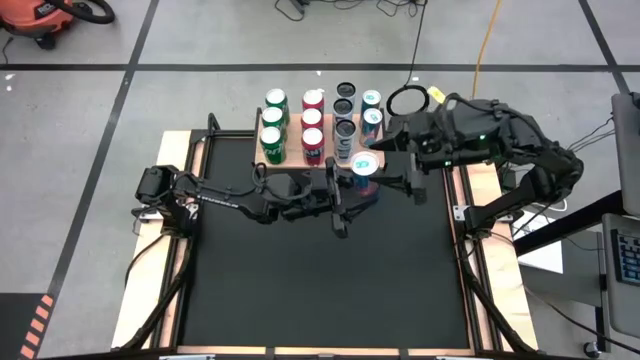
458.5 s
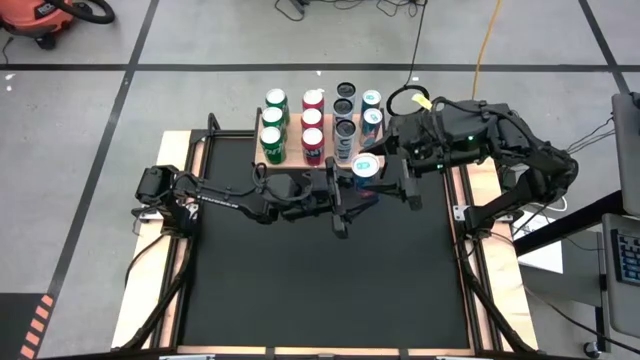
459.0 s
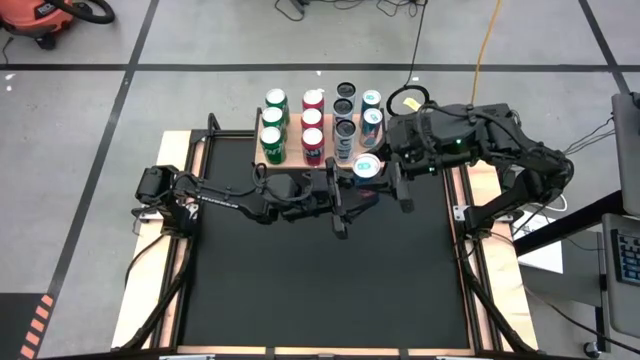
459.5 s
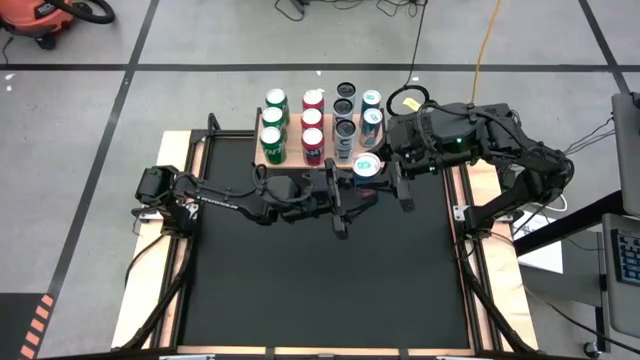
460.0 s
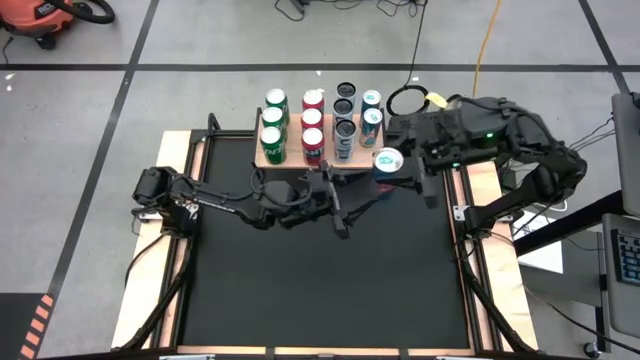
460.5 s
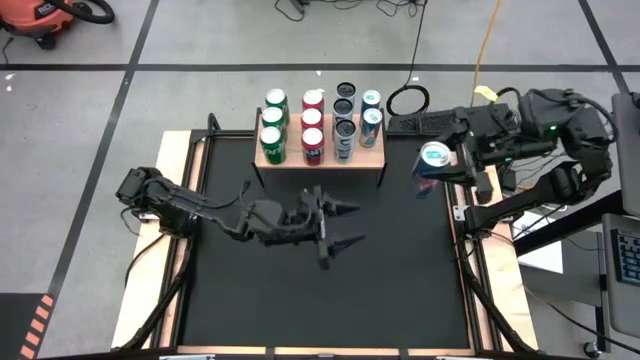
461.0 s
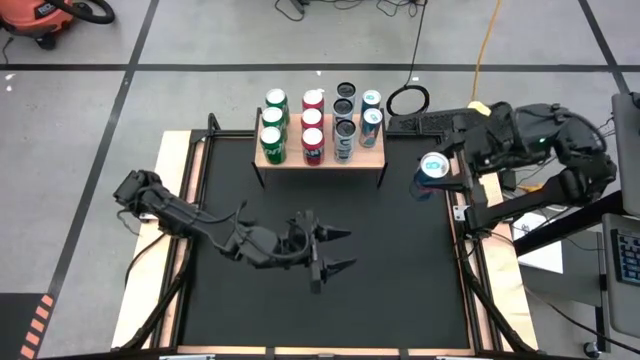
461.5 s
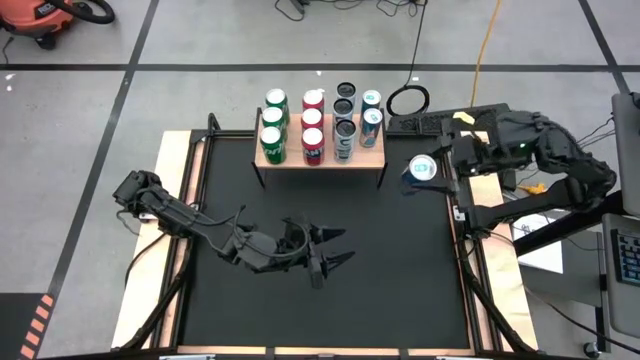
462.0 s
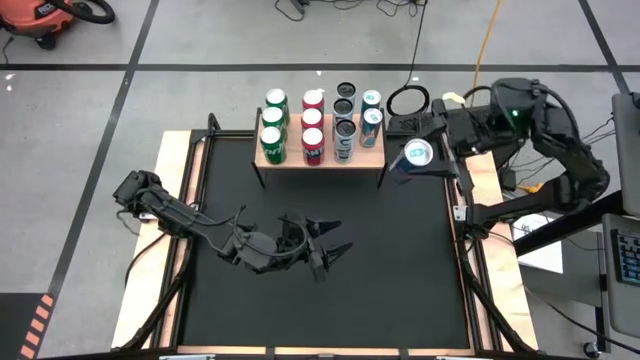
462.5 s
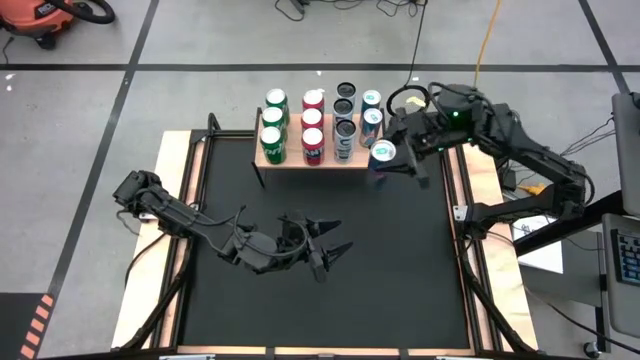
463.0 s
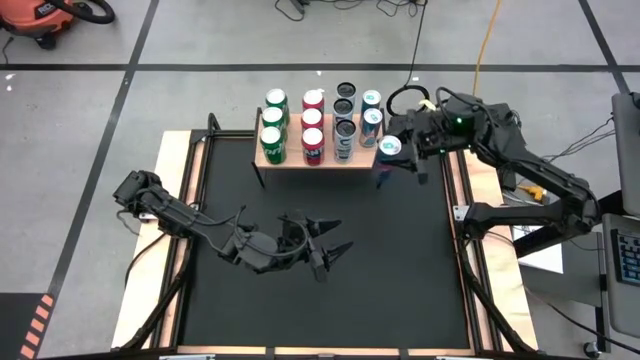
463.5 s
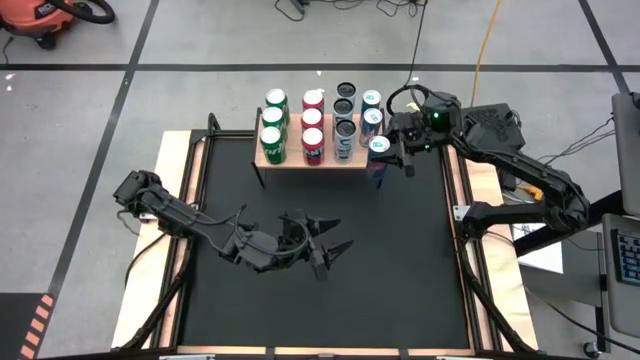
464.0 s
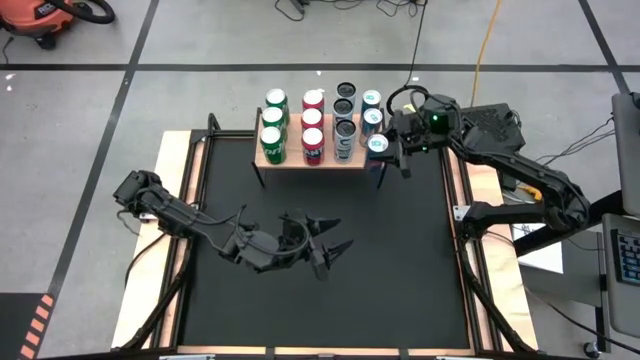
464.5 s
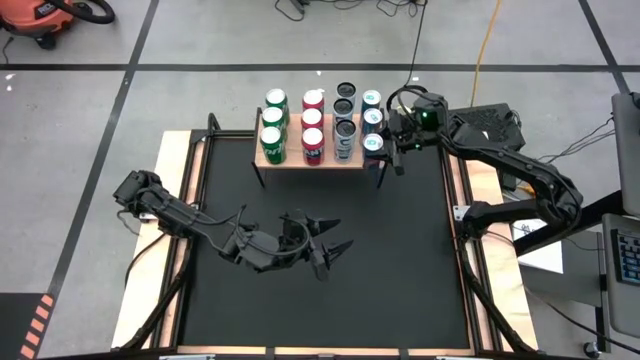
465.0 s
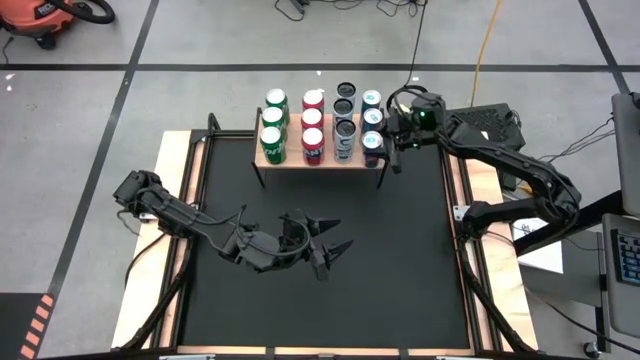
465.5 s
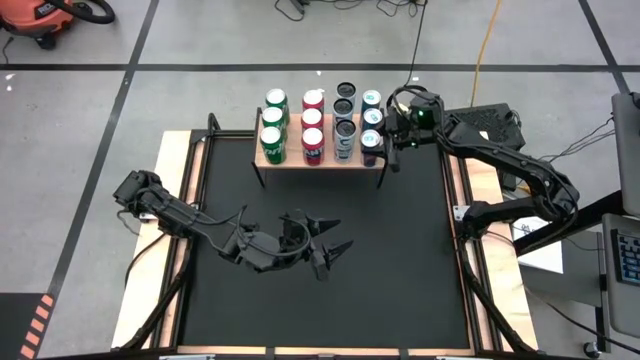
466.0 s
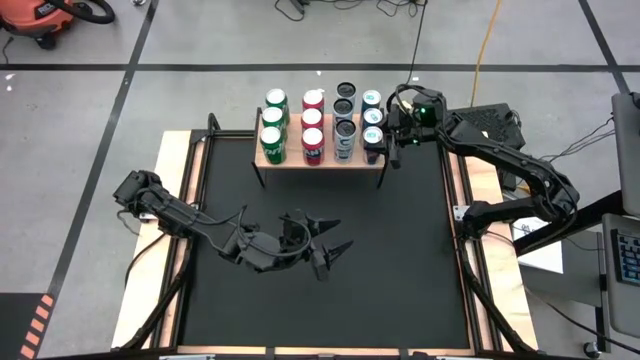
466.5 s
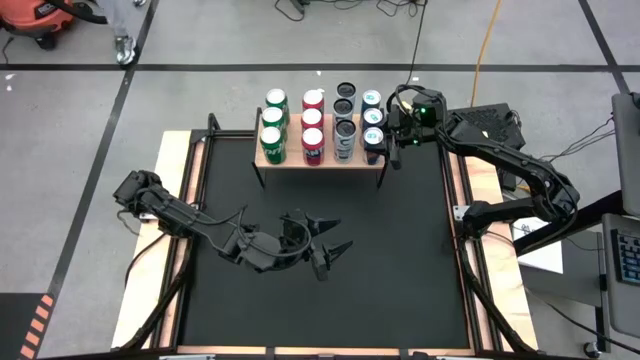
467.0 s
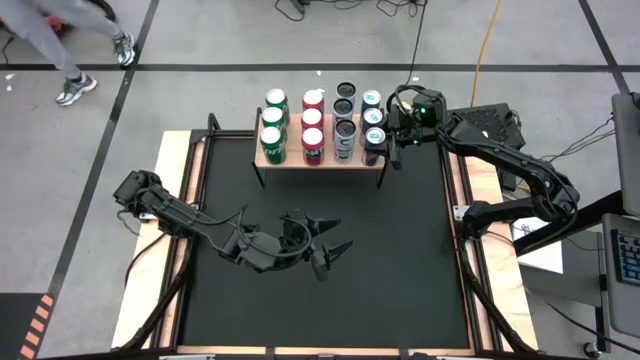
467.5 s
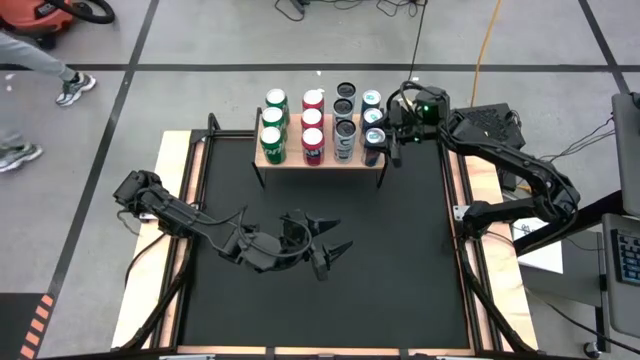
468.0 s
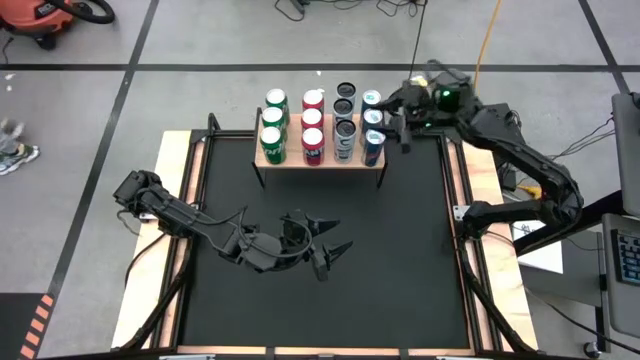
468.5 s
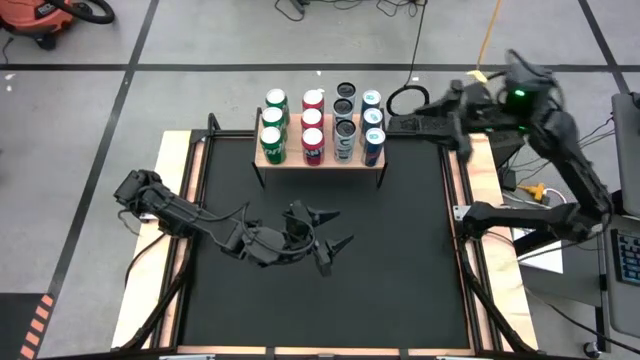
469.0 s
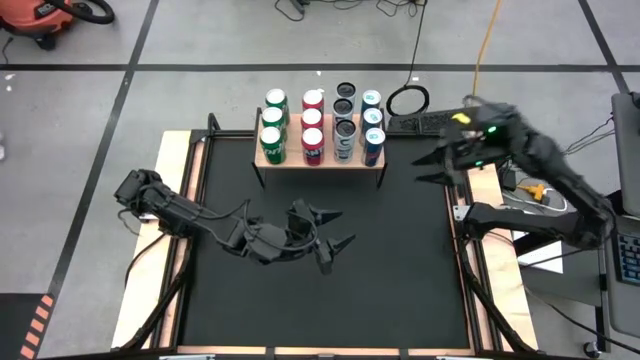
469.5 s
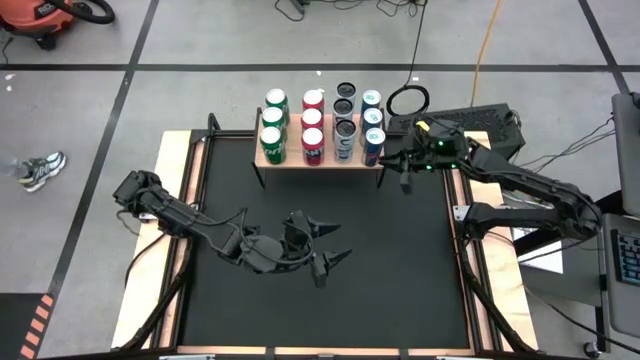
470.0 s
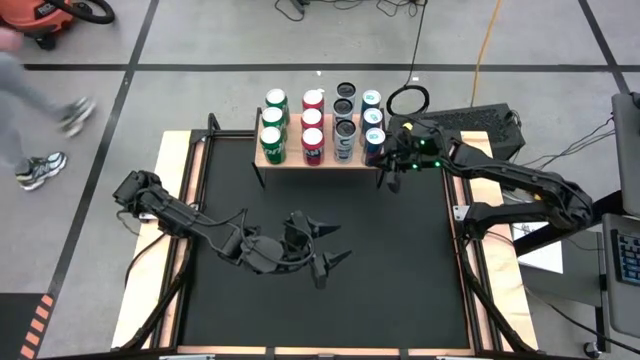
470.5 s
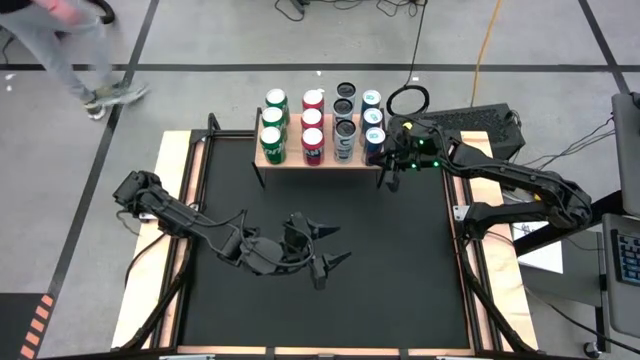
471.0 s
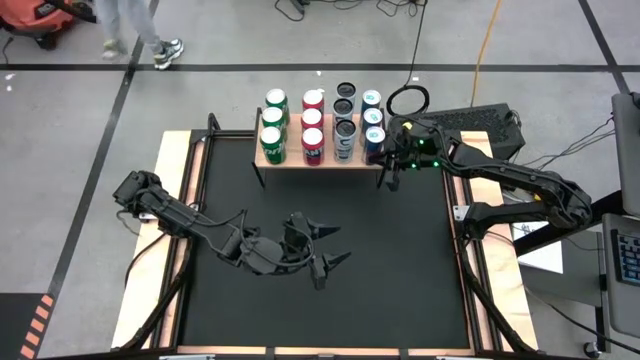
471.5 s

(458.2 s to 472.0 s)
Task: Place canned beverage on shelf
Put the blue soda can on the shelf aligned with the other blue soda can

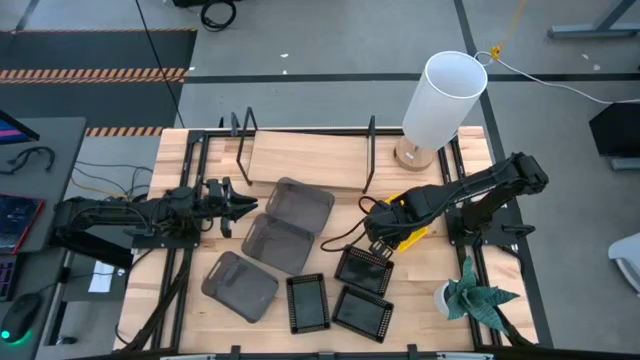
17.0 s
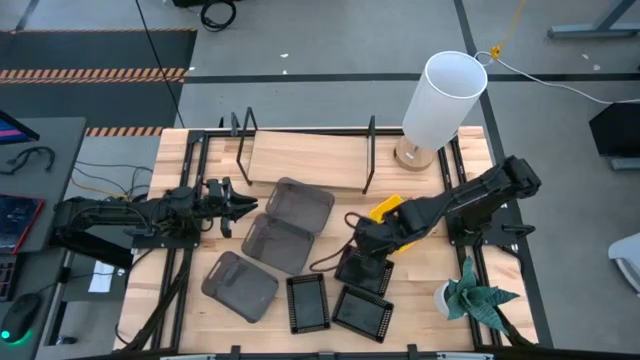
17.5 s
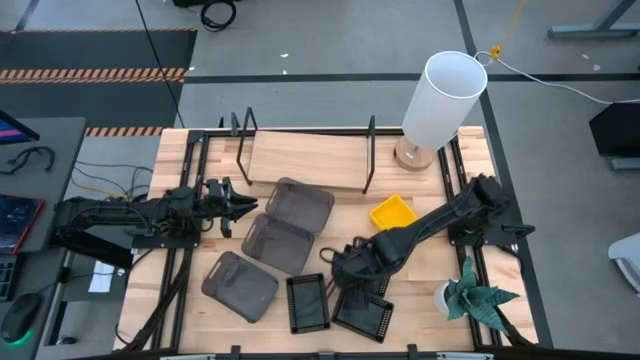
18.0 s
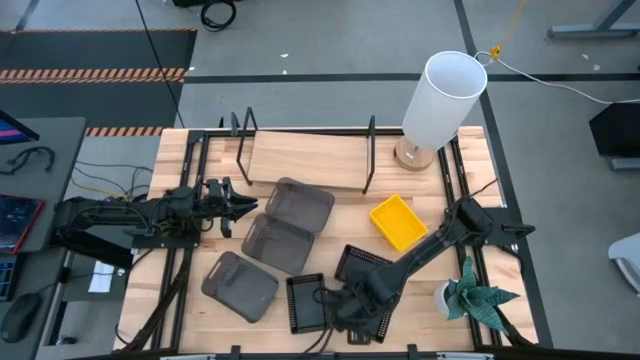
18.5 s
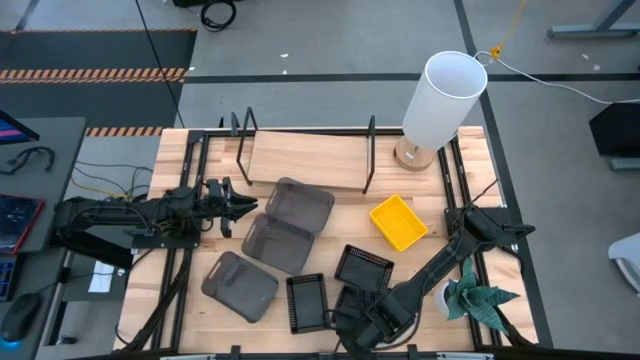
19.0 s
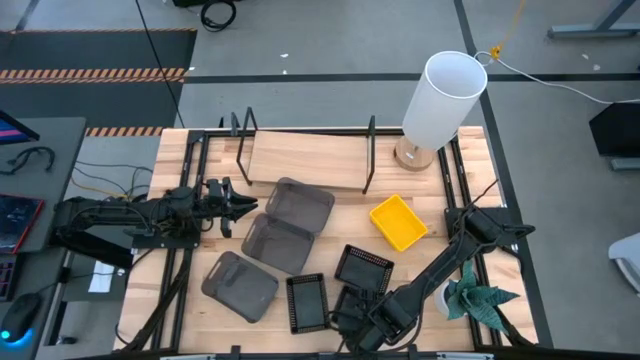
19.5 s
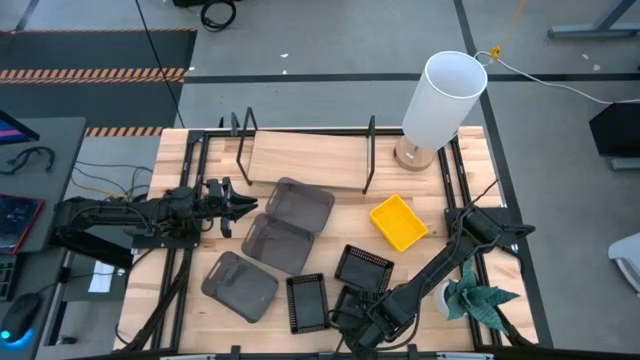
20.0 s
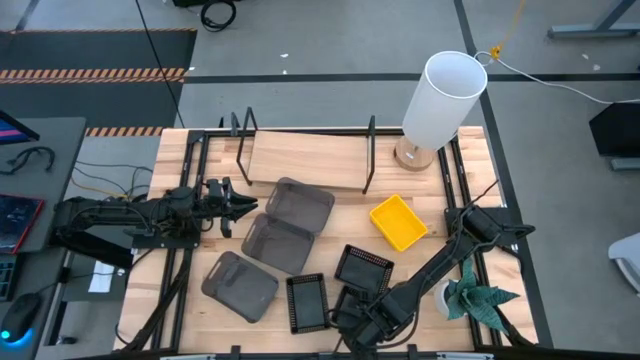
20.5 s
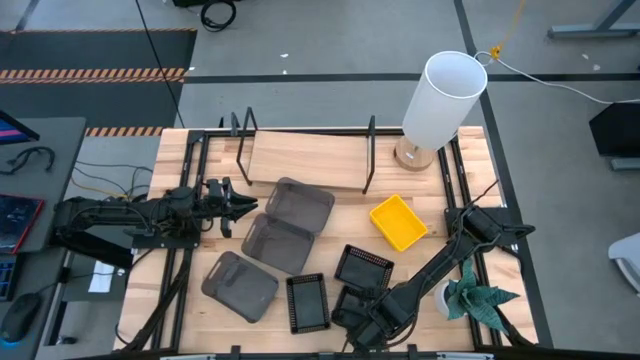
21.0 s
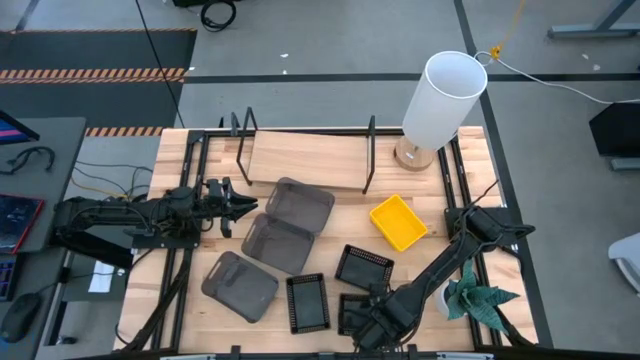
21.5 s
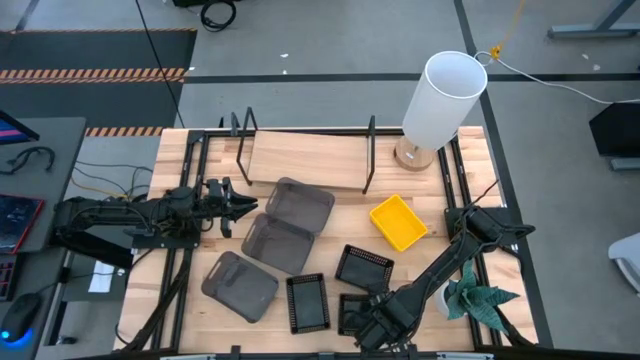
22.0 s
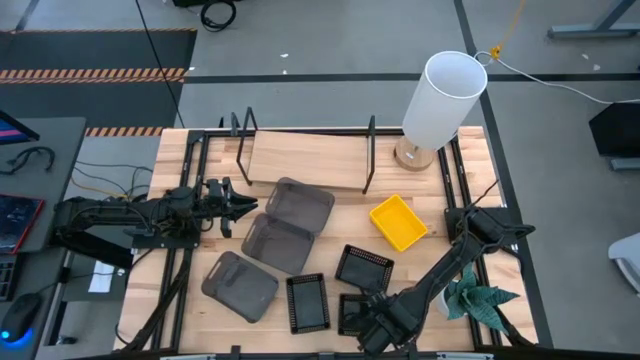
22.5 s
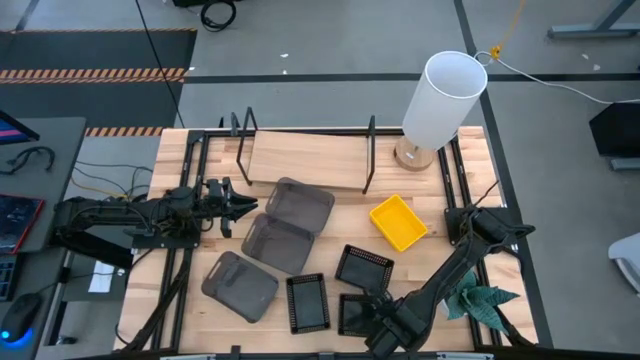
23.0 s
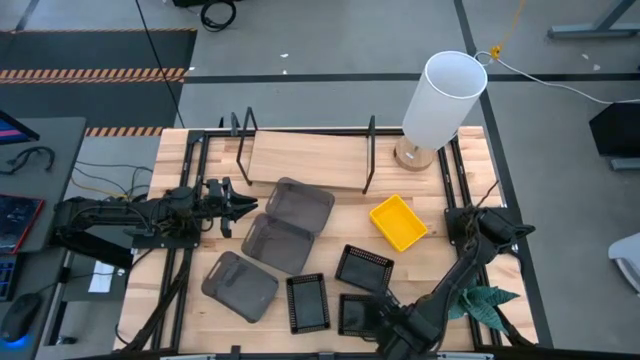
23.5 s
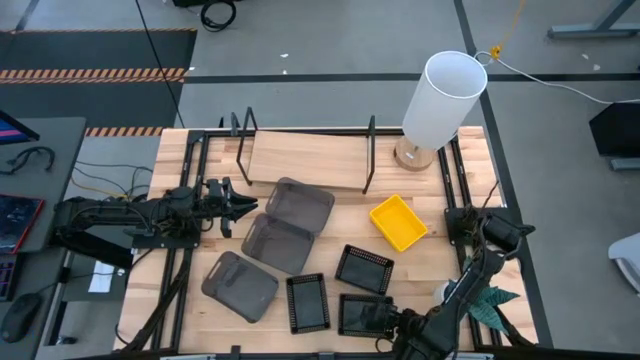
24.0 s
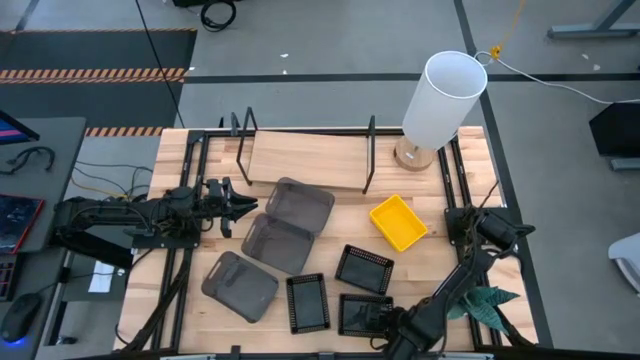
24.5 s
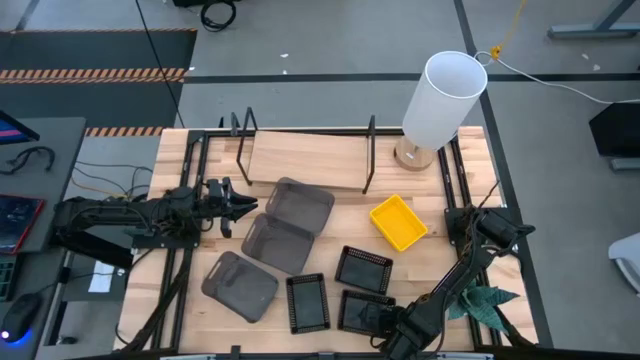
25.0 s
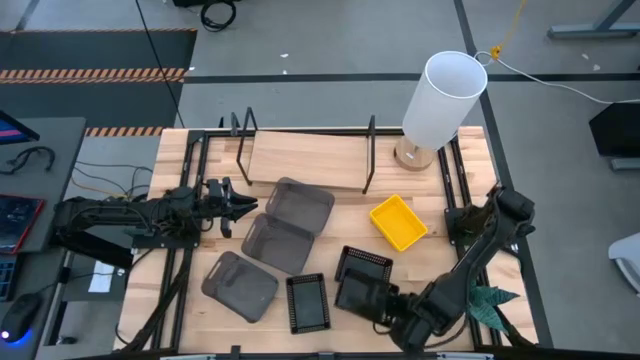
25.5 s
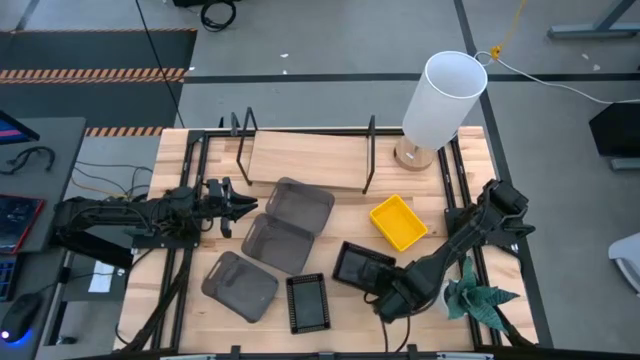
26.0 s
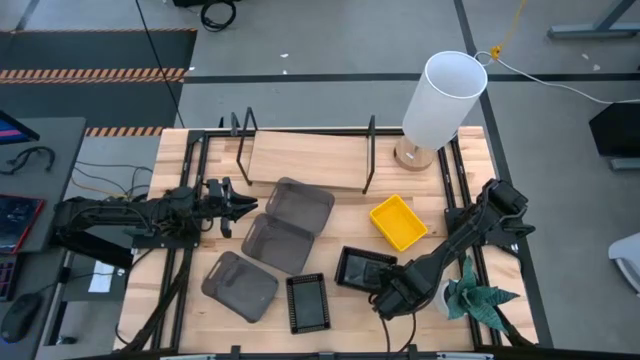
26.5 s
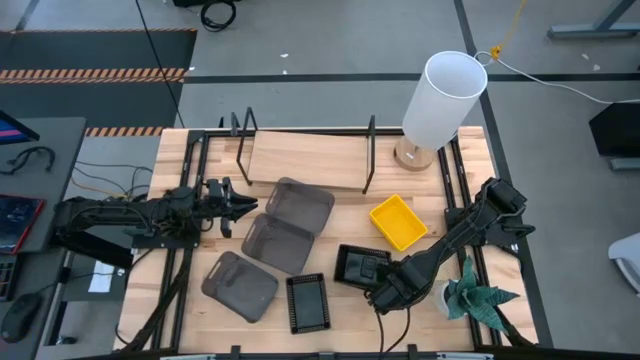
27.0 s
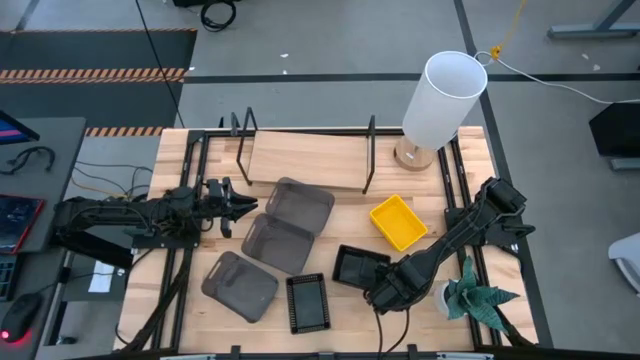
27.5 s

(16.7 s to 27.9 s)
Task: Stack baskets on shelf by color
Stack the bottom right black basket on the top black basket
